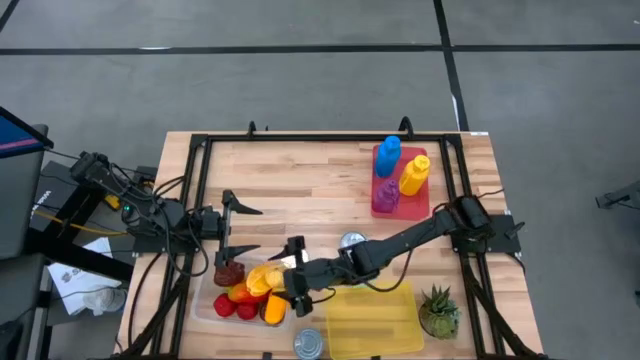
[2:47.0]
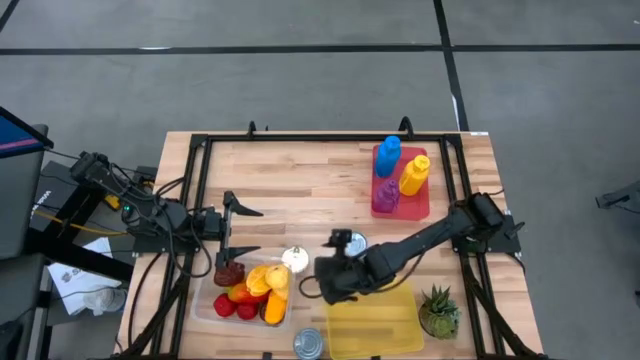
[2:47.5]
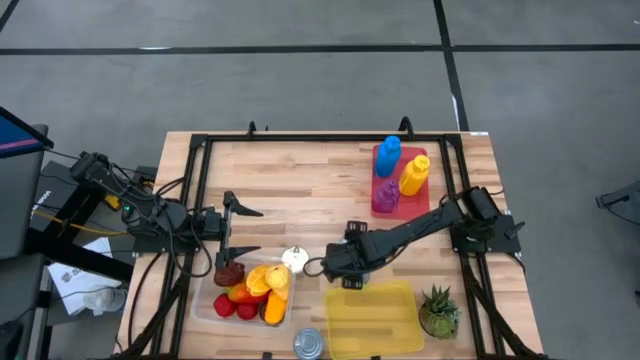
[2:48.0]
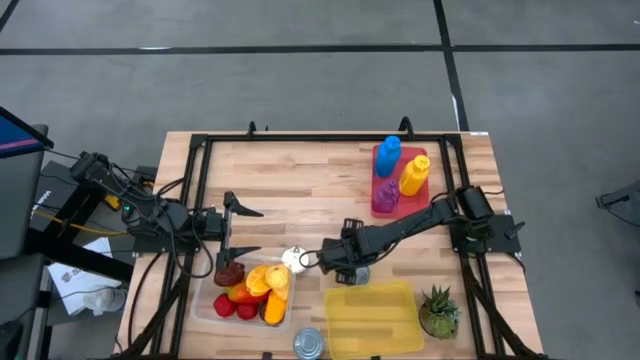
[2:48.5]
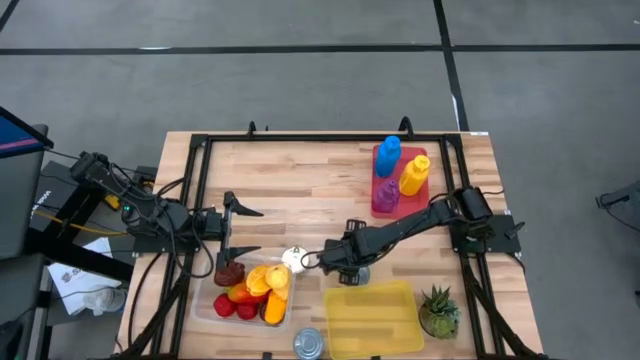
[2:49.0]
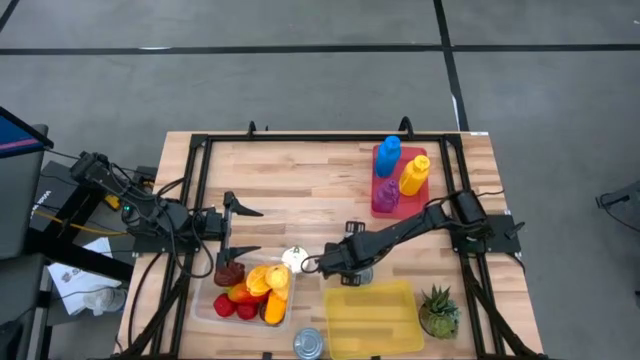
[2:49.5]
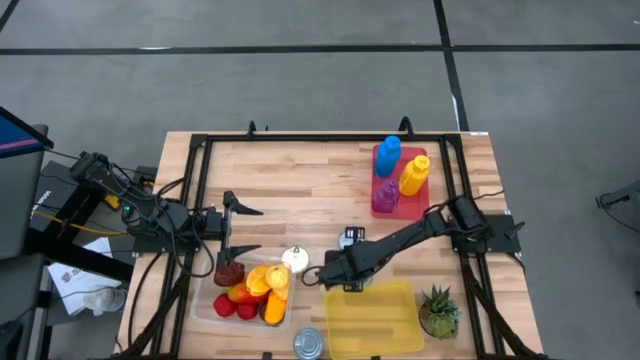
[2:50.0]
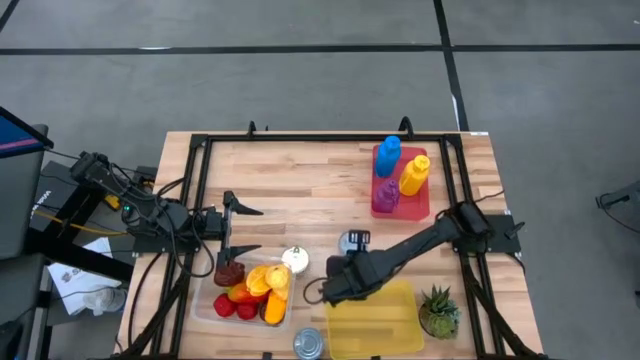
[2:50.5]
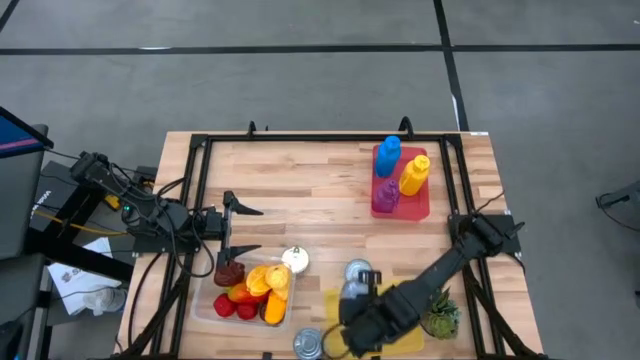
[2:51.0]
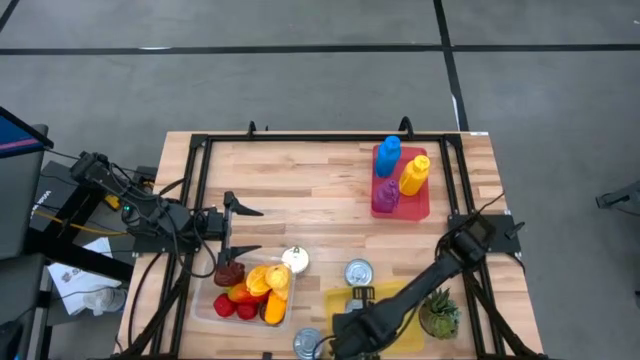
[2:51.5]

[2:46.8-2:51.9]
Task: Pick & Place Food Item
Put the red tuna can into the yellow bin

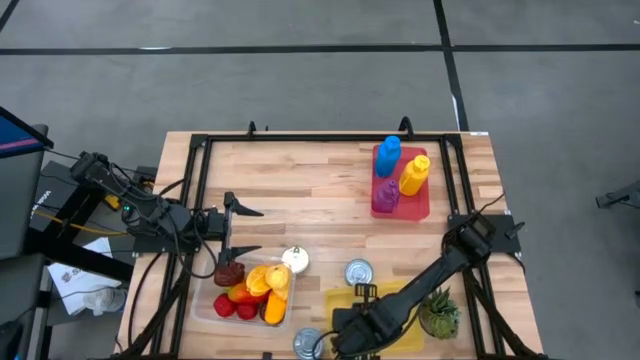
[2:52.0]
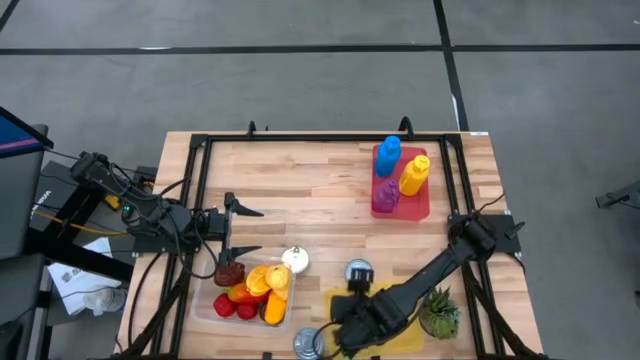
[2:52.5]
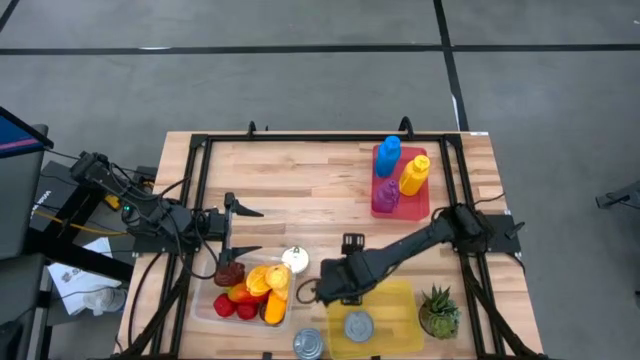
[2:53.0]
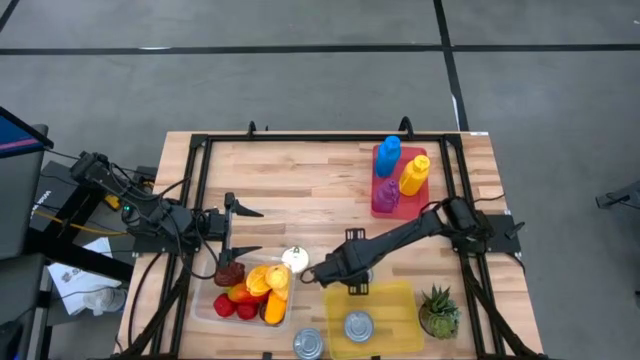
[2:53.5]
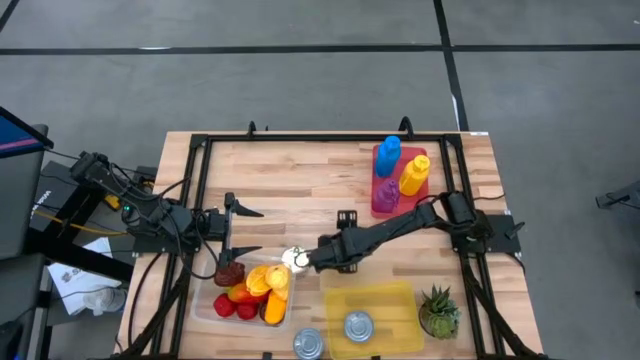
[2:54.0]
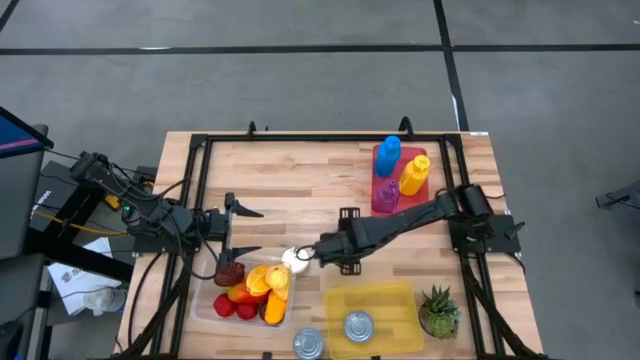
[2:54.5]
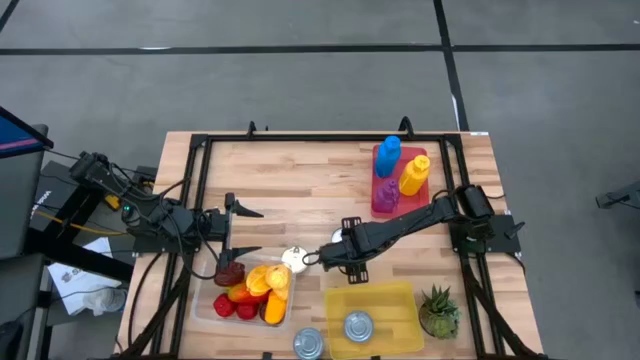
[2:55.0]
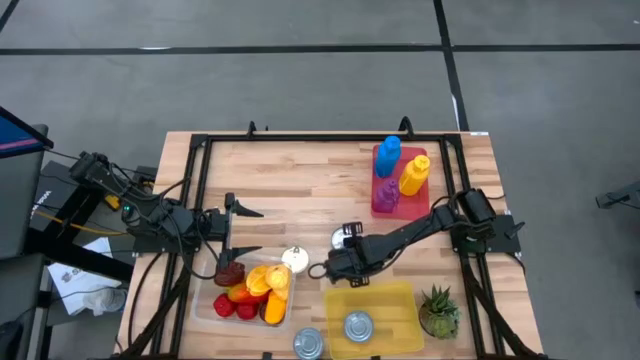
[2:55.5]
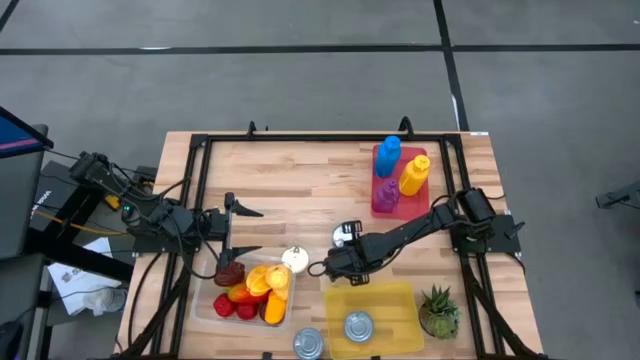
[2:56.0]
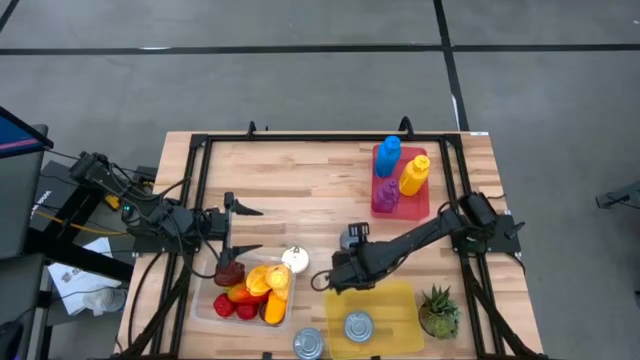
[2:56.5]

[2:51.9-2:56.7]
Put the blue tuna can into the yellow bin

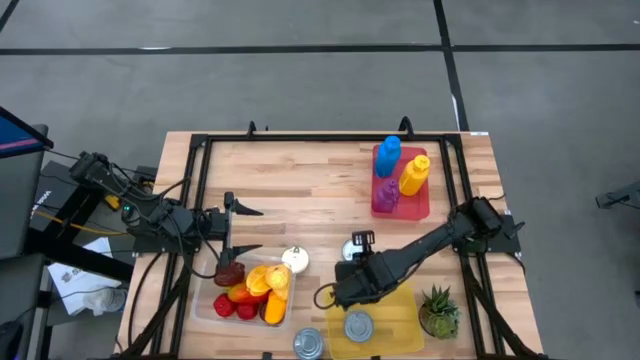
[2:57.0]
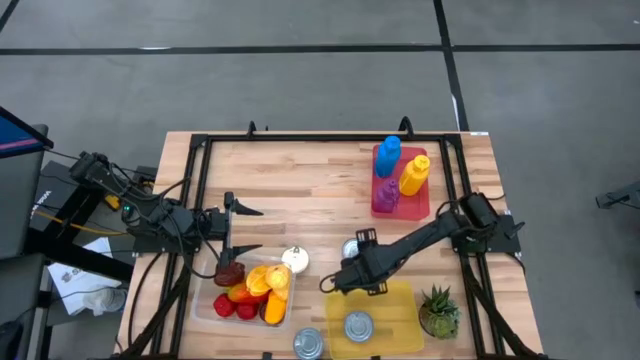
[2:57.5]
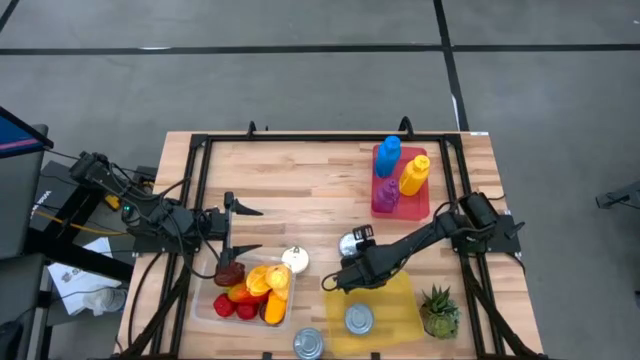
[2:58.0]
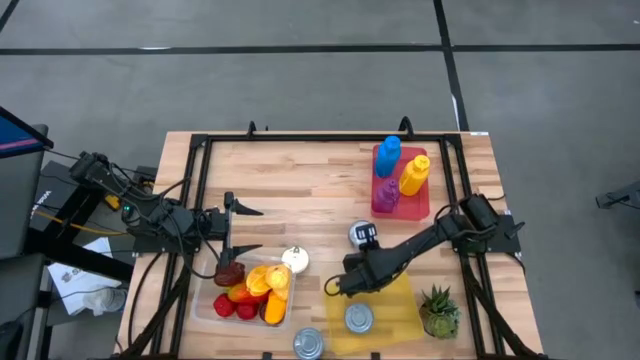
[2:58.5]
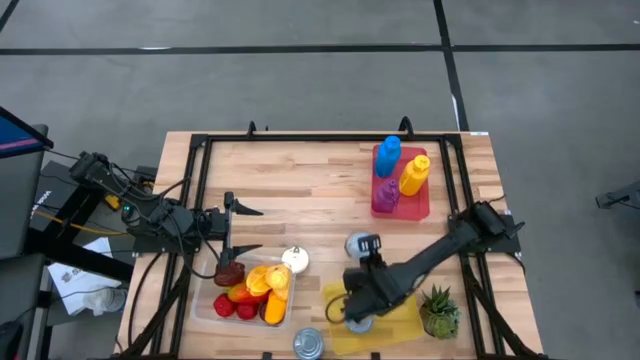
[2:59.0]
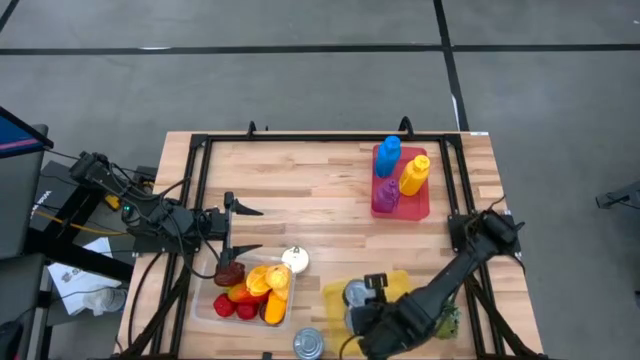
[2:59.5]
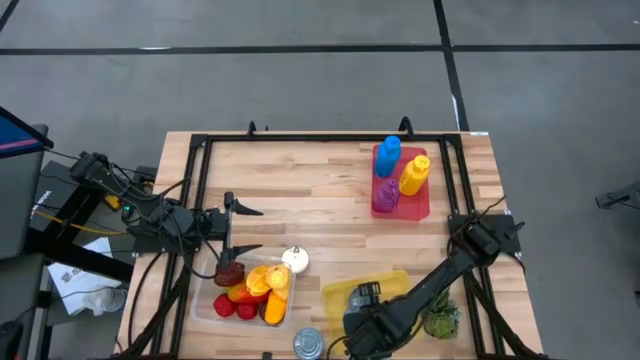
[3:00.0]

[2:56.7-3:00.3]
Put the blue tuna can into the yellow bin

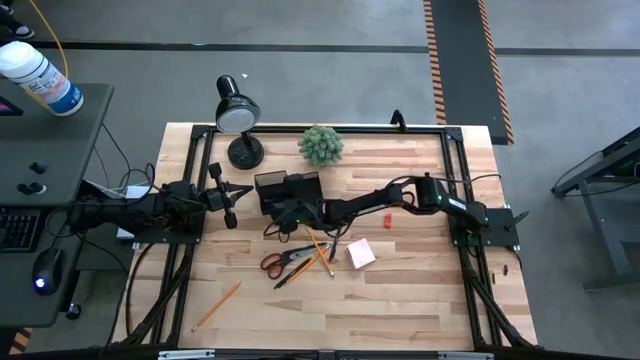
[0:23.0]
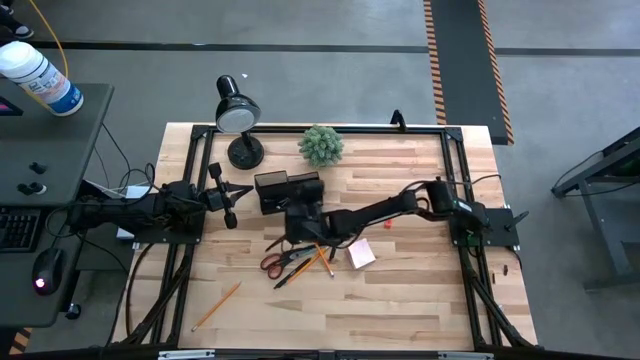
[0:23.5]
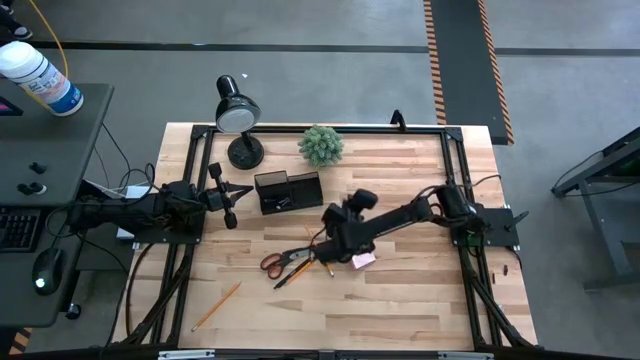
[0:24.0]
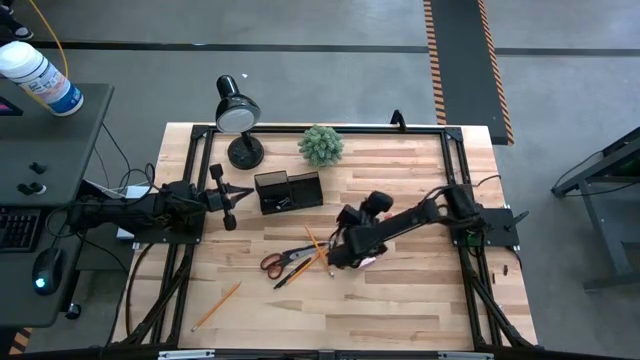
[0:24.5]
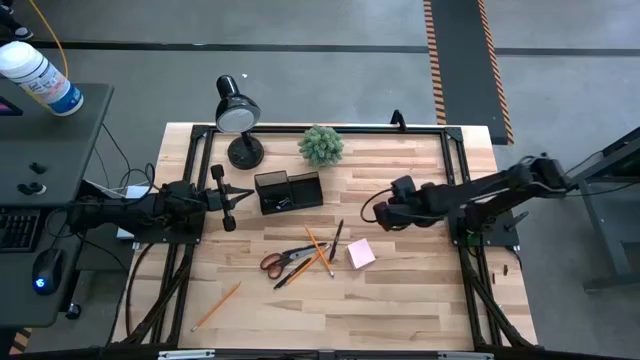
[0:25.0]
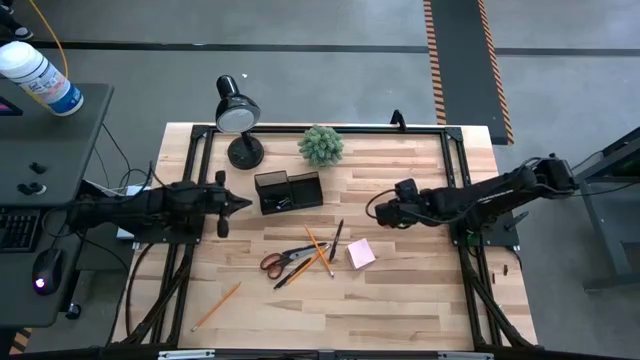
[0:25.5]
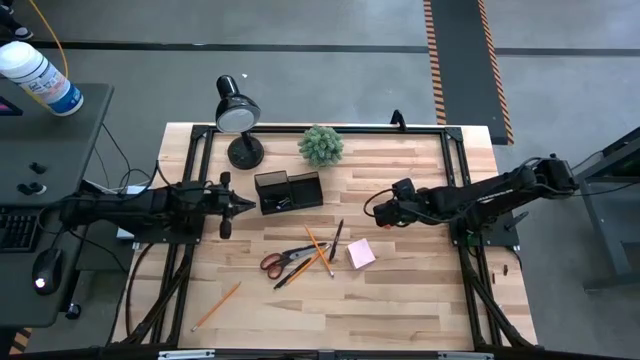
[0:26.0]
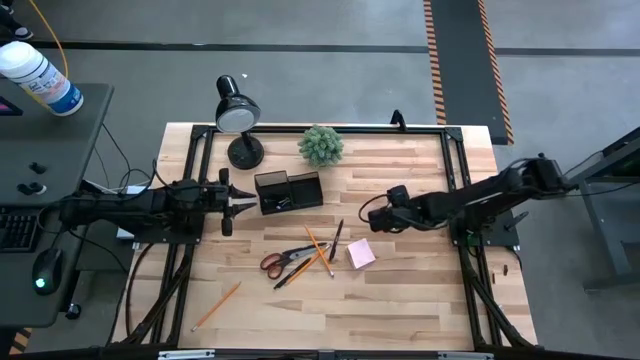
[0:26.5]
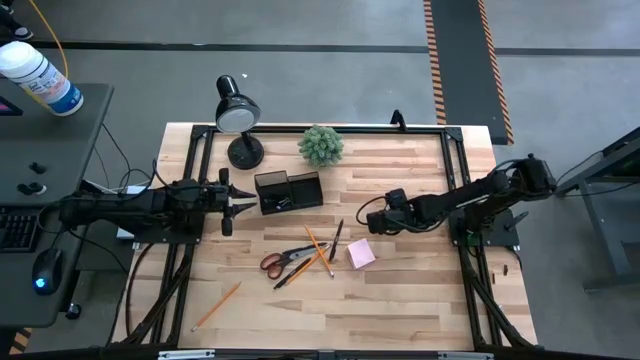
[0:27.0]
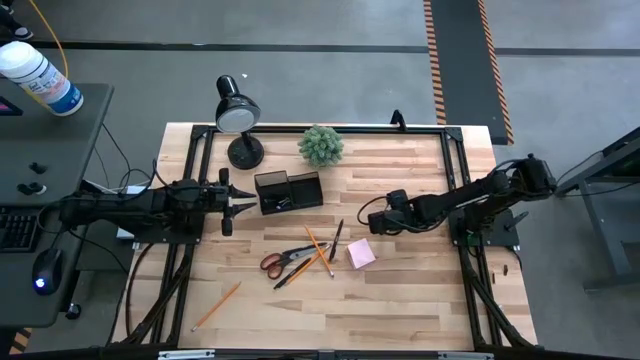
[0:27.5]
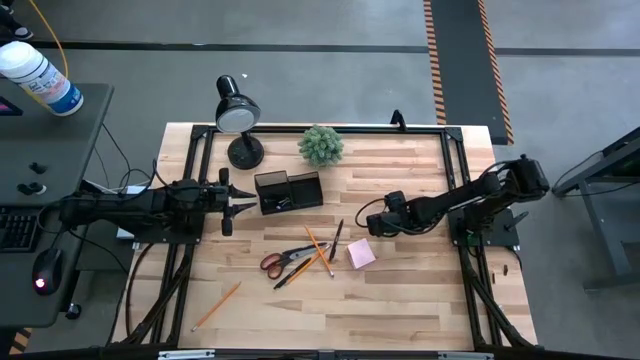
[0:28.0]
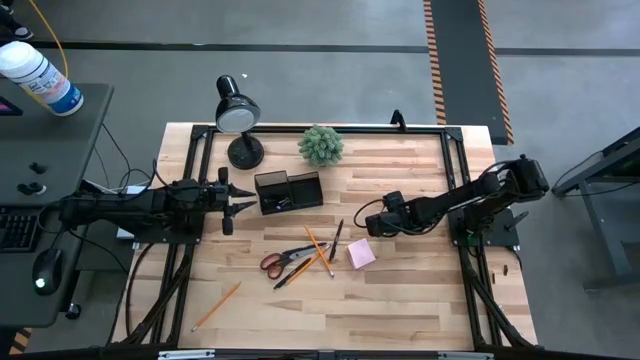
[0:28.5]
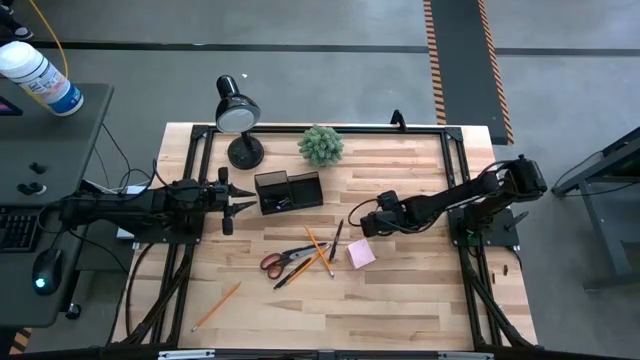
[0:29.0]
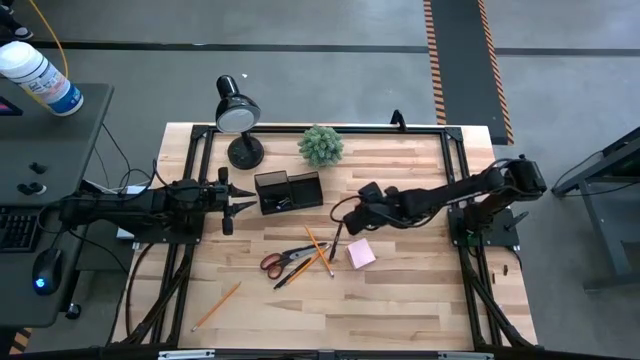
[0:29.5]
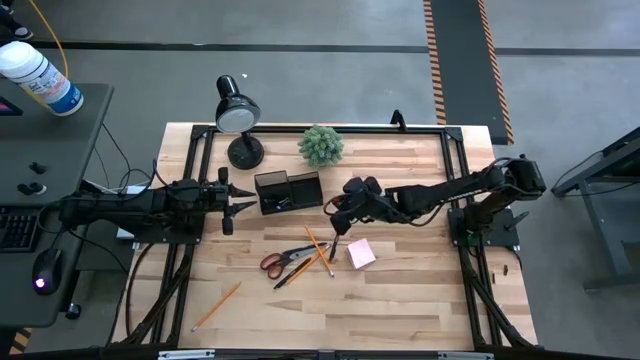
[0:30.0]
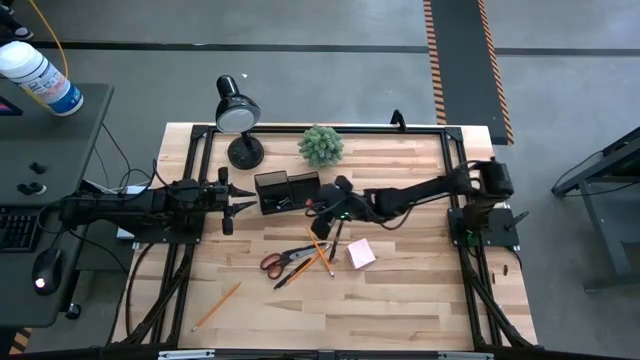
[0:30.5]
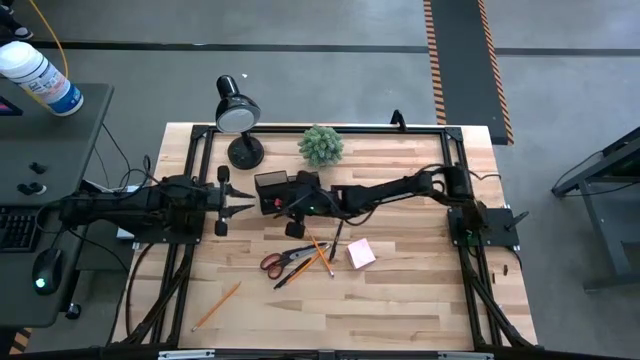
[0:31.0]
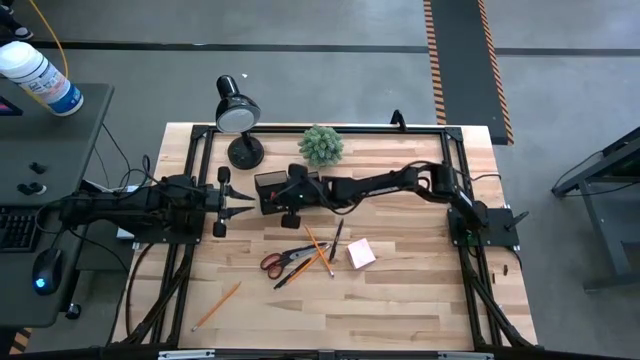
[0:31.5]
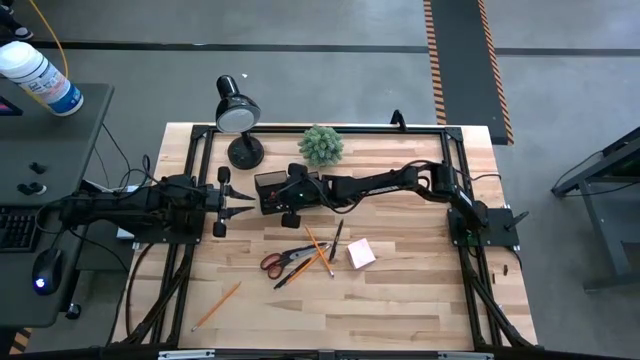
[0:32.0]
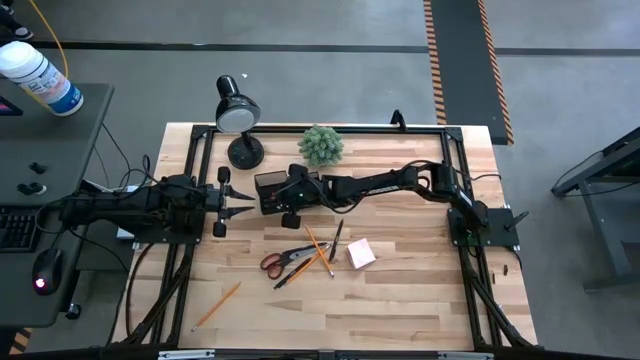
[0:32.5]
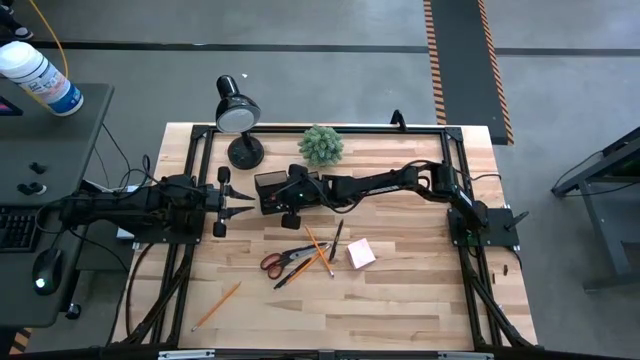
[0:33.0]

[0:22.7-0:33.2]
Task: Pick and place office supplies into organizer
Put the eraser into the desktop organizer
